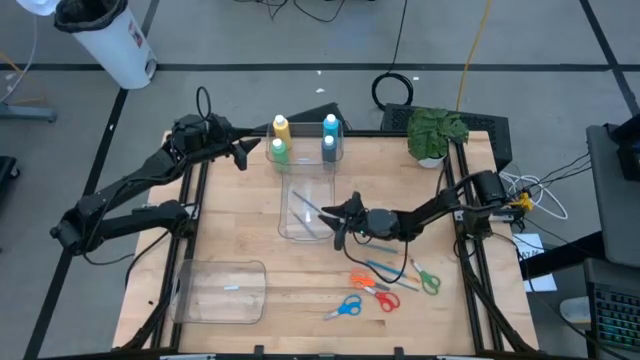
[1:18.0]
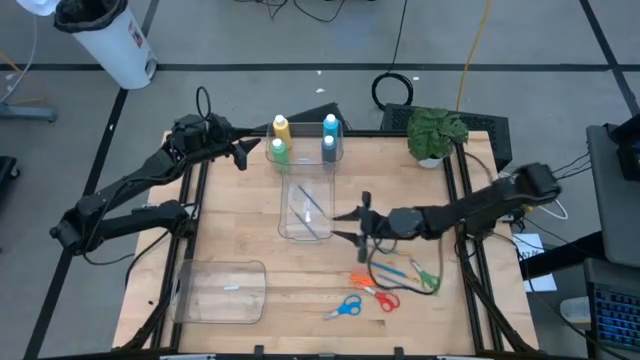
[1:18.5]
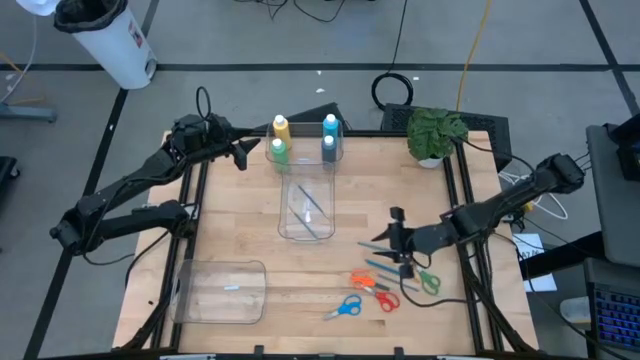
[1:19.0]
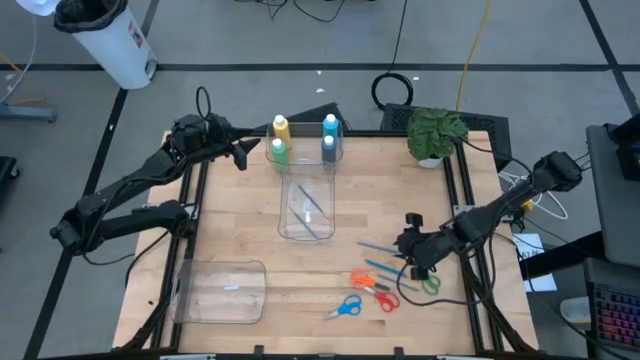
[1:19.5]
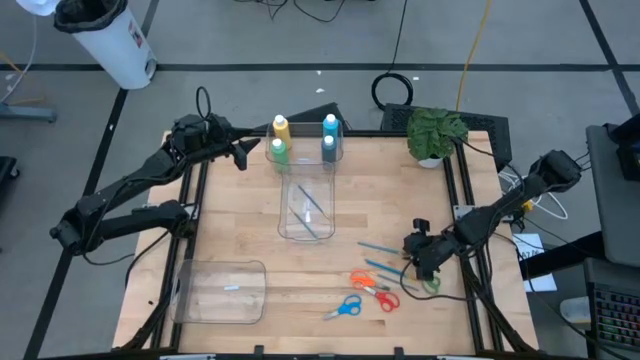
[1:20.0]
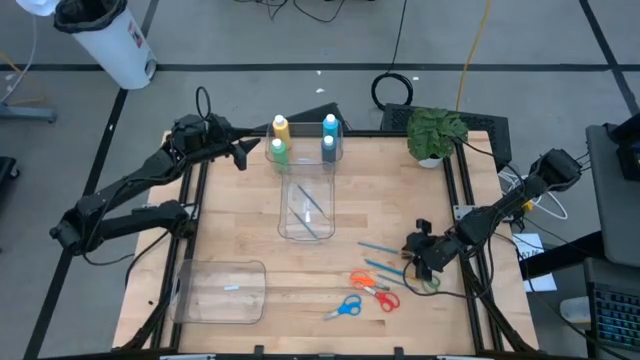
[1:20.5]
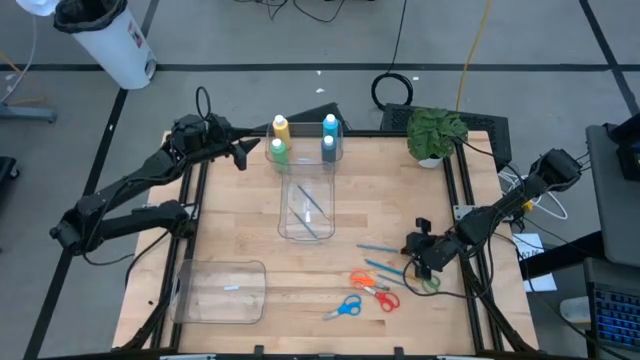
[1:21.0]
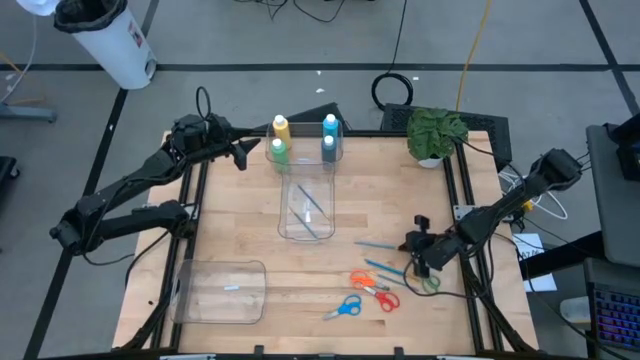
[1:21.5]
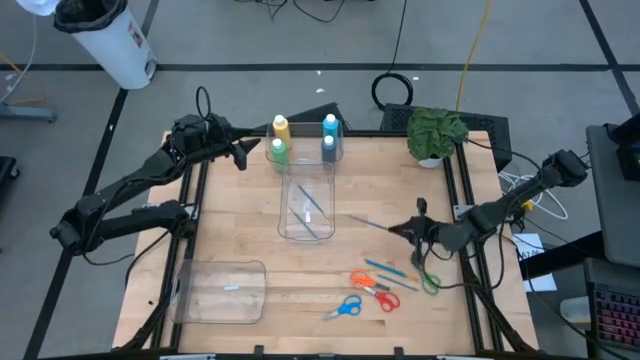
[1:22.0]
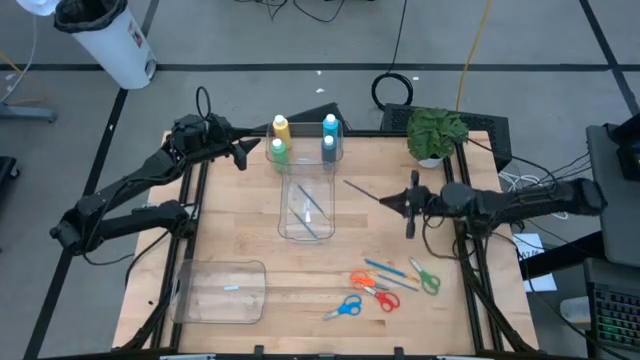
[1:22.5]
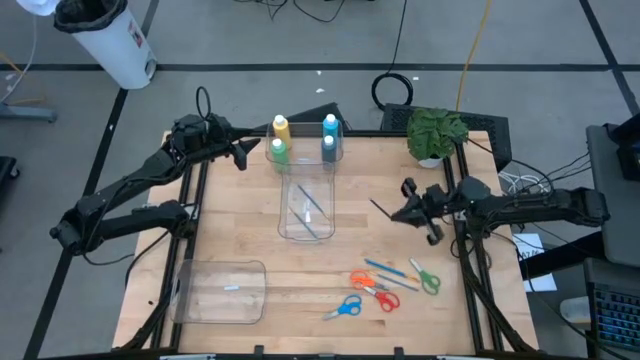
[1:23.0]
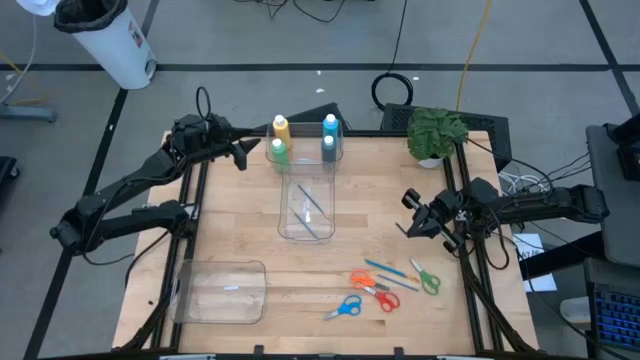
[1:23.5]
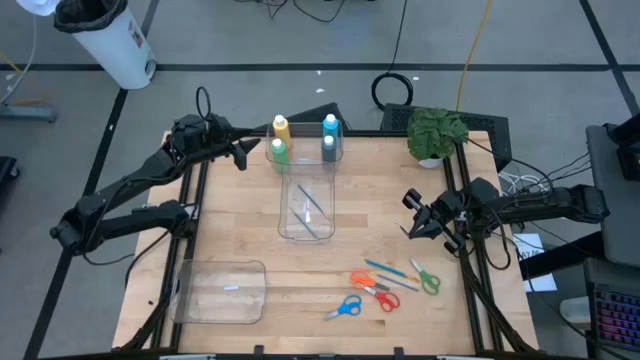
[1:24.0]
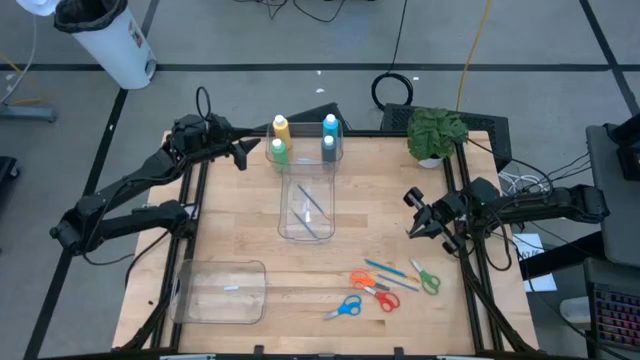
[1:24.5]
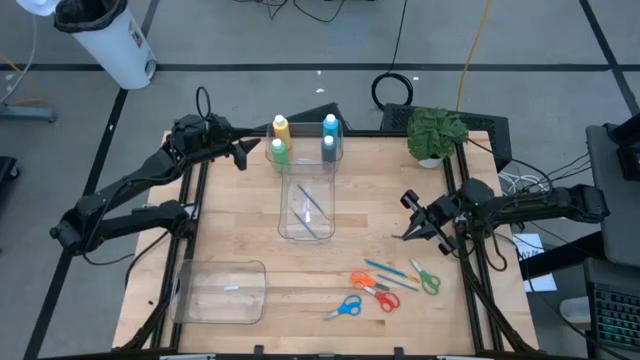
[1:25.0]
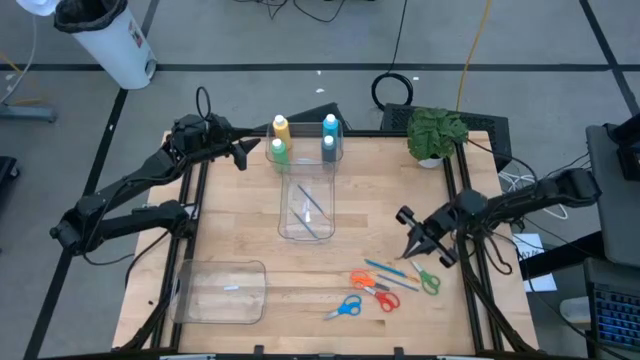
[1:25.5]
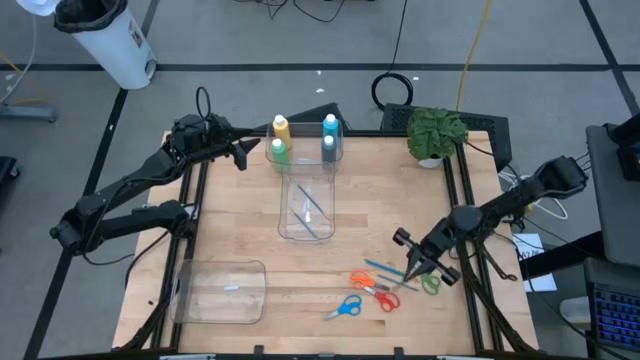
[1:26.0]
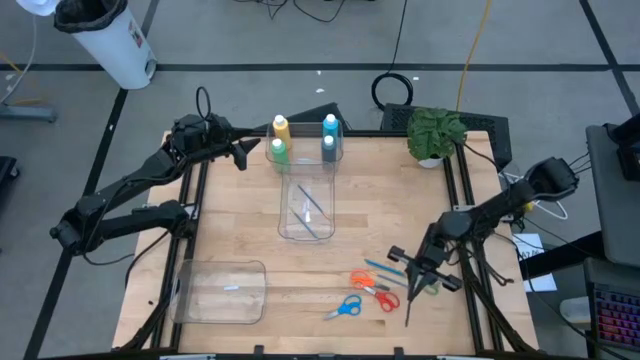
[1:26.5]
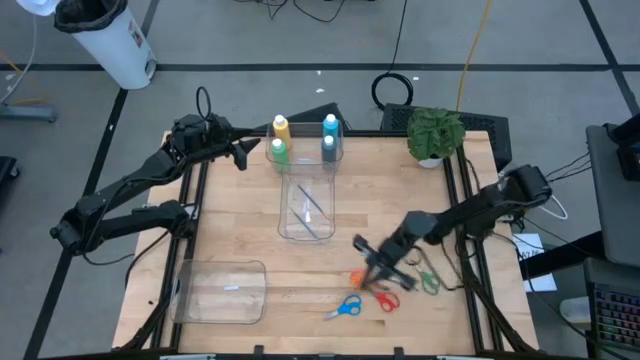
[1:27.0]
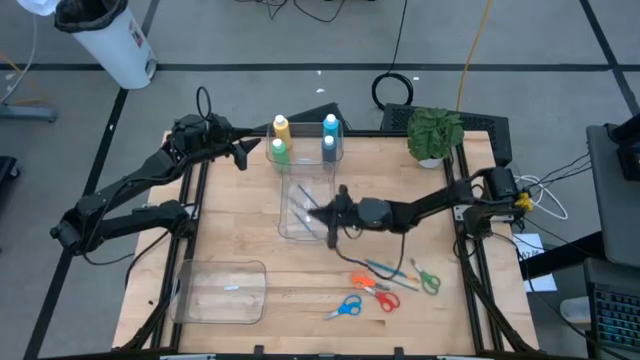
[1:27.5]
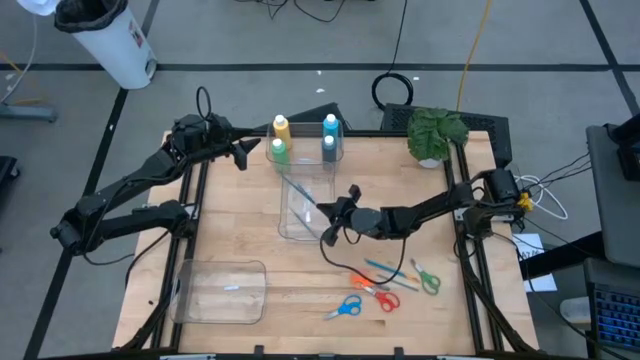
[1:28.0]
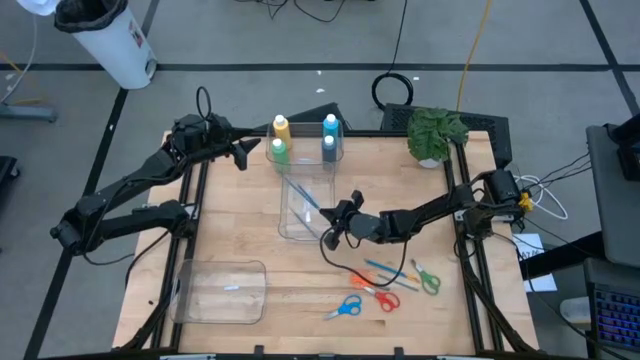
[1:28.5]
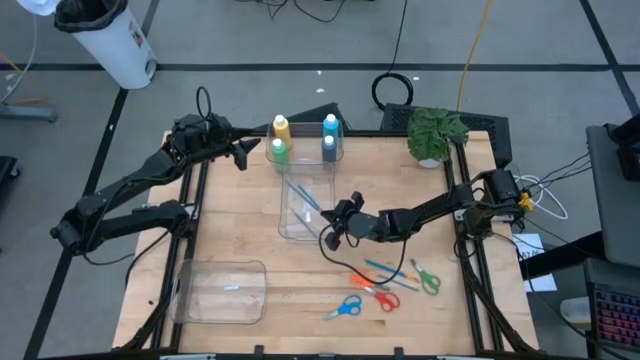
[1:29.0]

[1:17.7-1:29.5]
Task: Pick & Place Paint Supplies
Put the blue paintbrush into the middle transparent bin

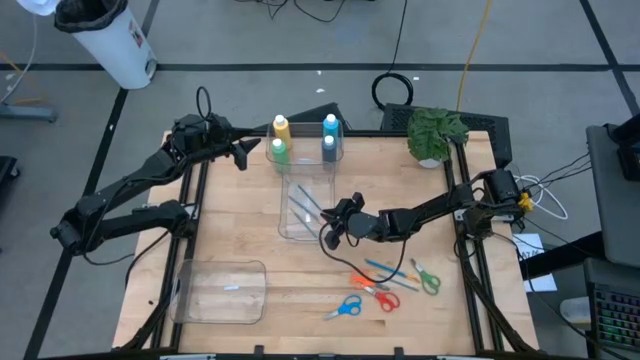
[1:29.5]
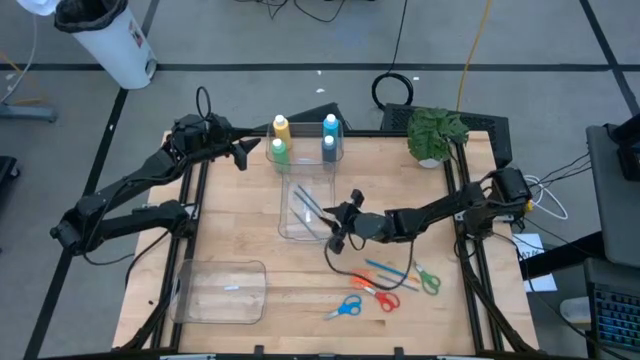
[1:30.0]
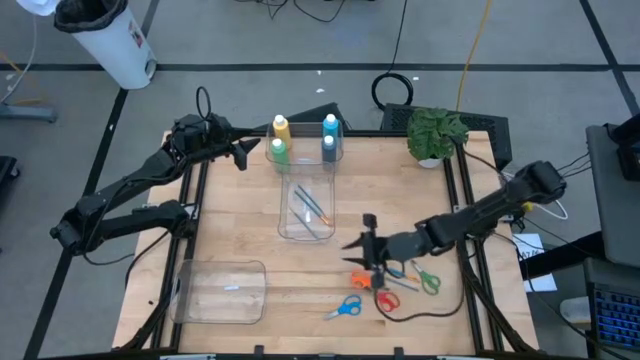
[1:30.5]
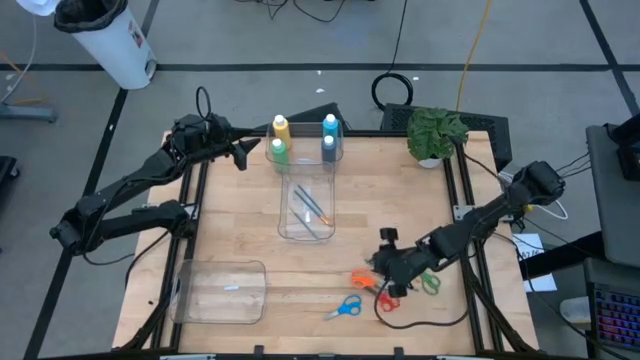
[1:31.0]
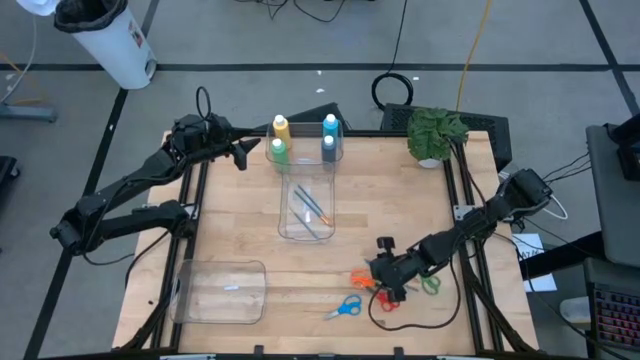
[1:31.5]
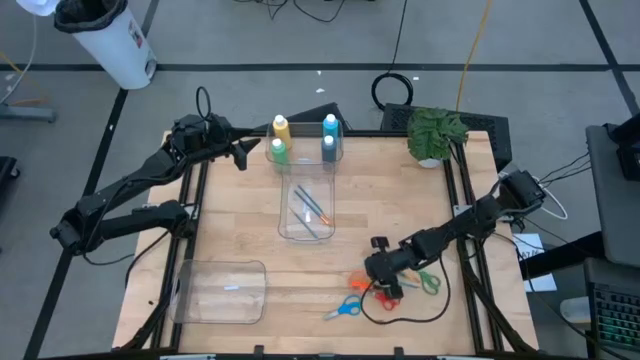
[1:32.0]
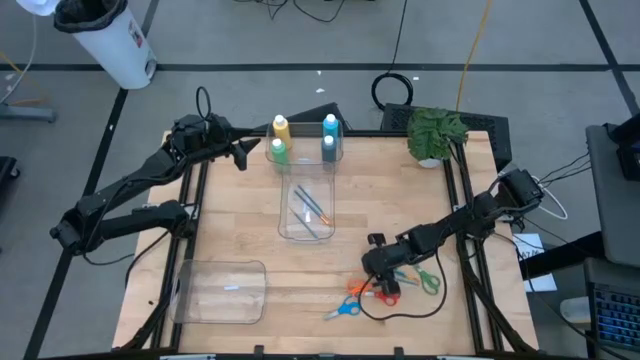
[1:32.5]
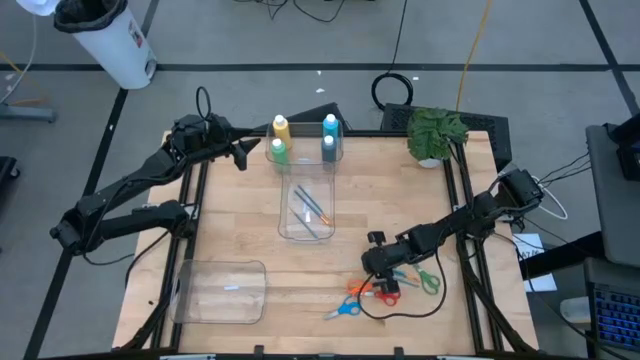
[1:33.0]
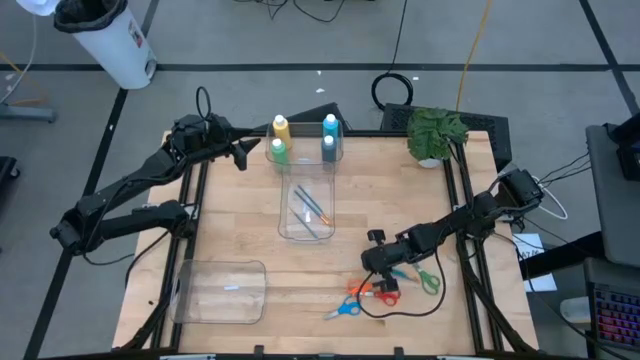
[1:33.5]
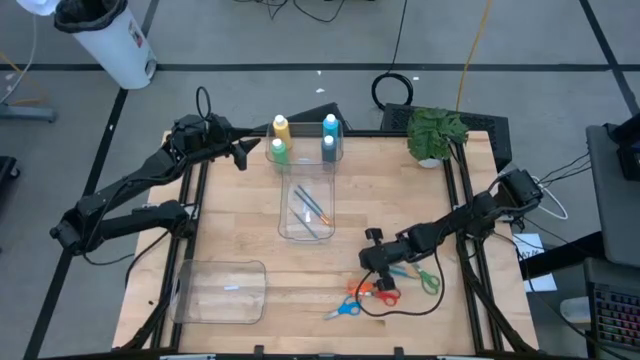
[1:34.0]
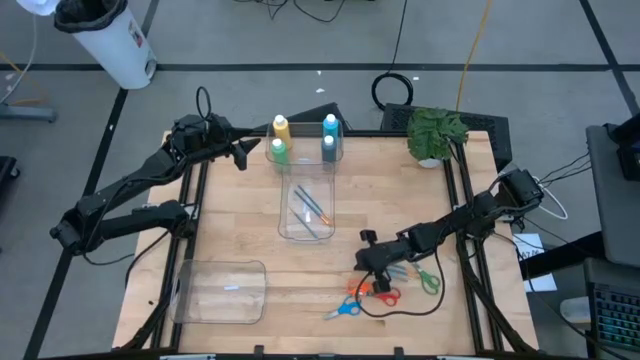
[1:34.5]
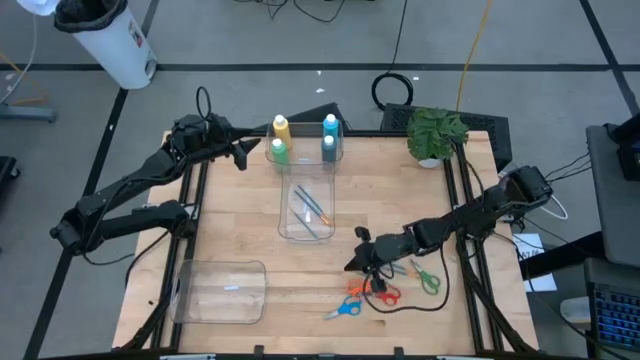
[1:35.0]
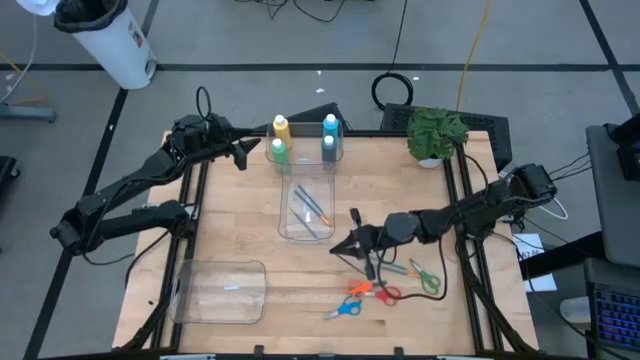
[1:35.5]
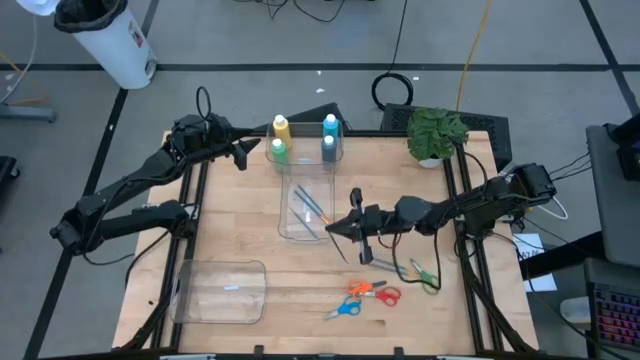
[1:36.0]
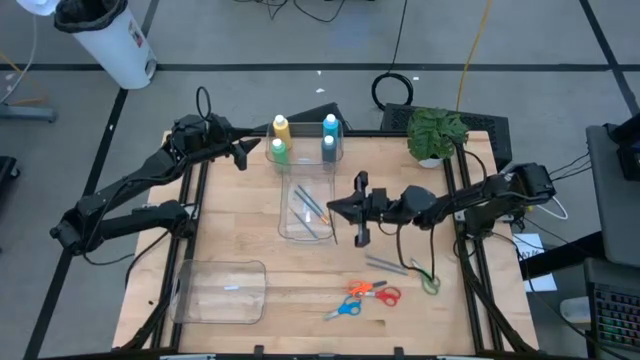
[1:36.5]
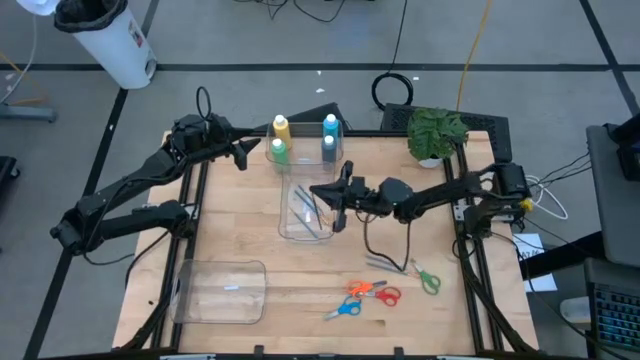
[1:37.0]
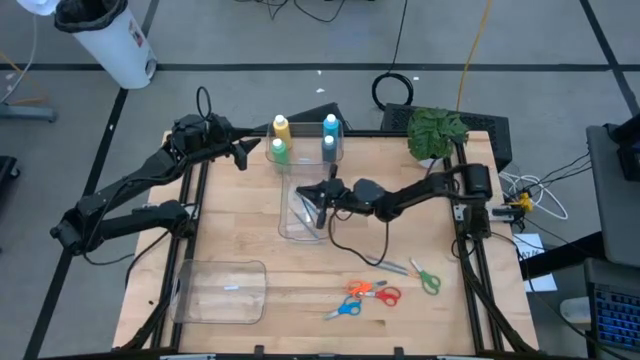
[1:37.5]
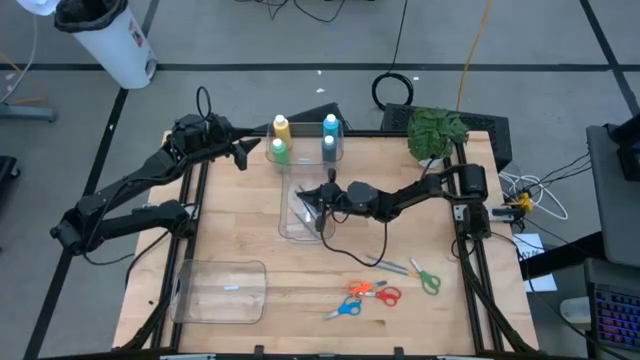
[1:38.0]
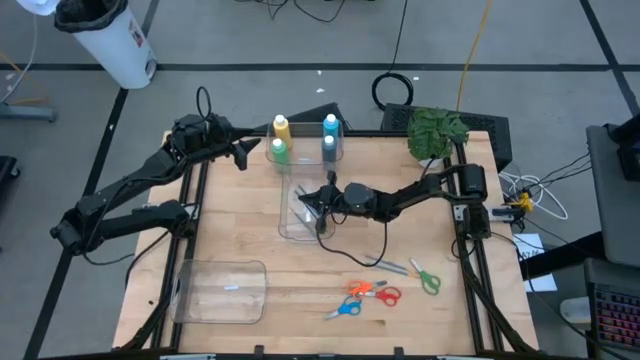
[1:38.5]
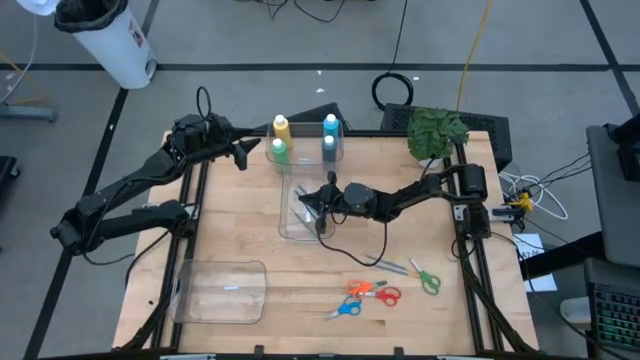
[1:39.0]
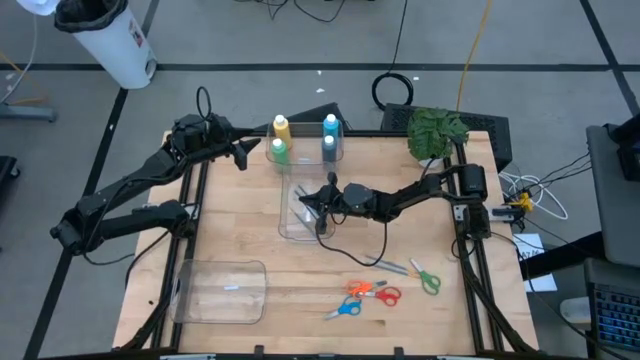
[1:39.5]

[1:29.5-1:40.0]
Put the blue paintbrush into the middle transparent bin
